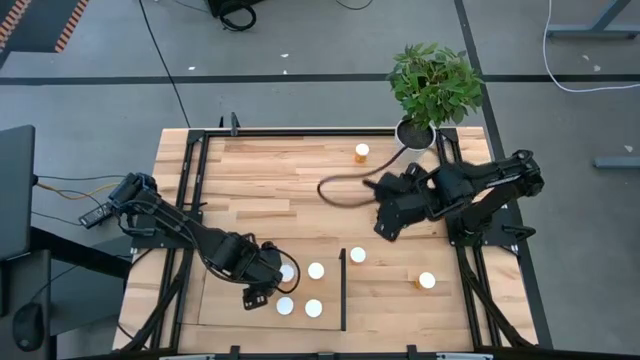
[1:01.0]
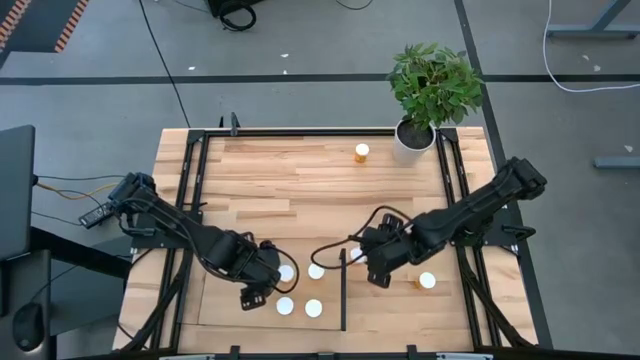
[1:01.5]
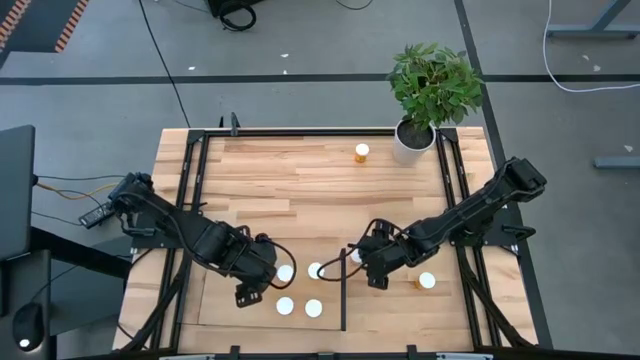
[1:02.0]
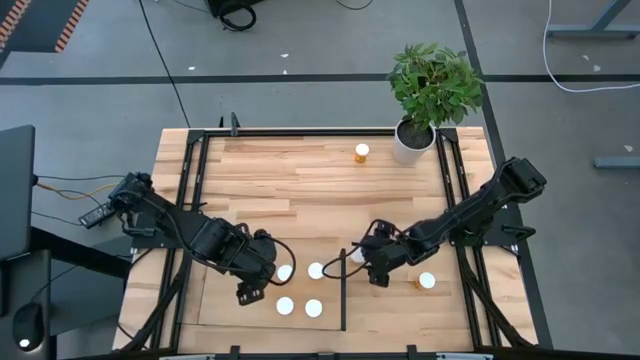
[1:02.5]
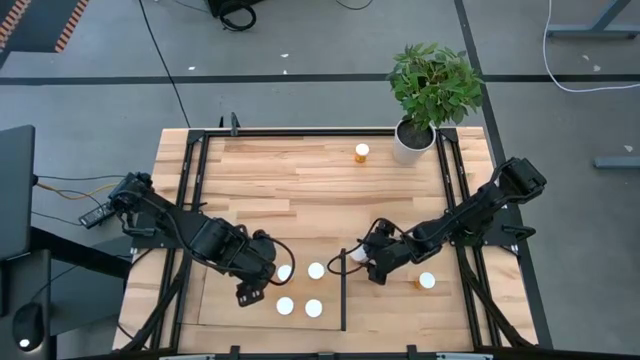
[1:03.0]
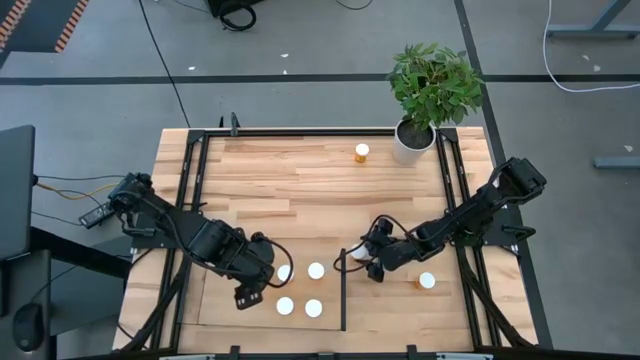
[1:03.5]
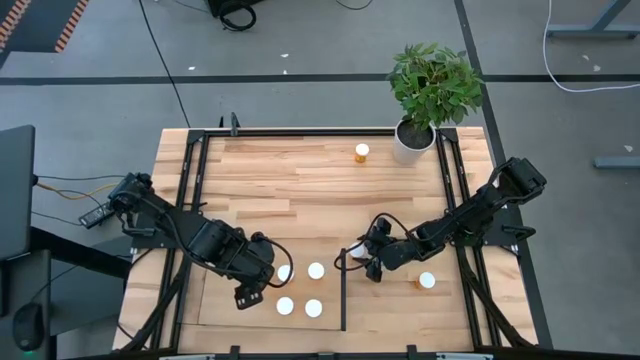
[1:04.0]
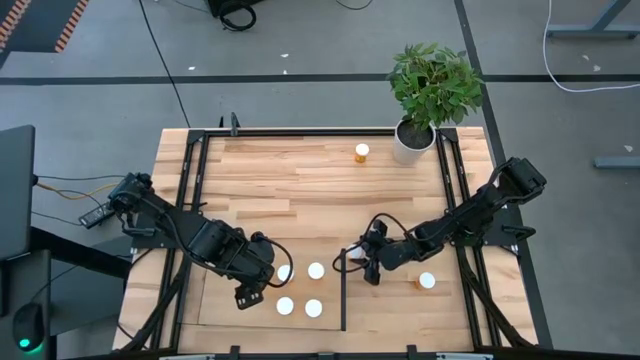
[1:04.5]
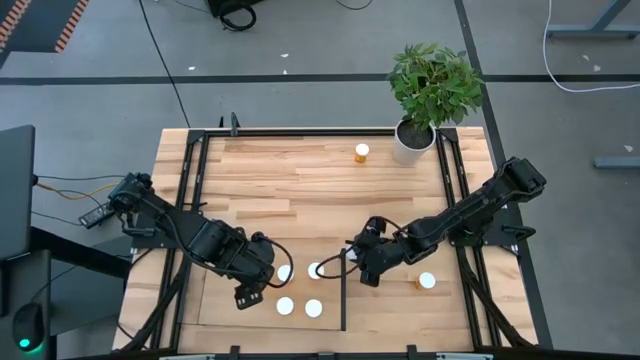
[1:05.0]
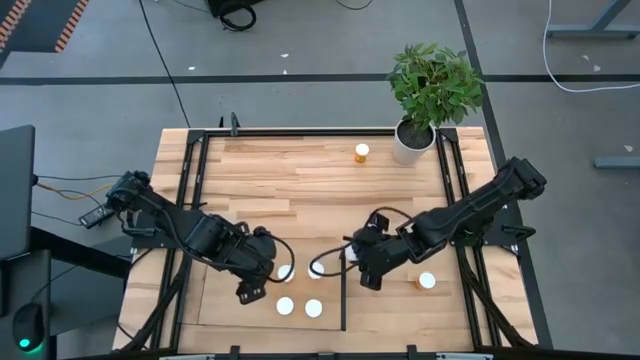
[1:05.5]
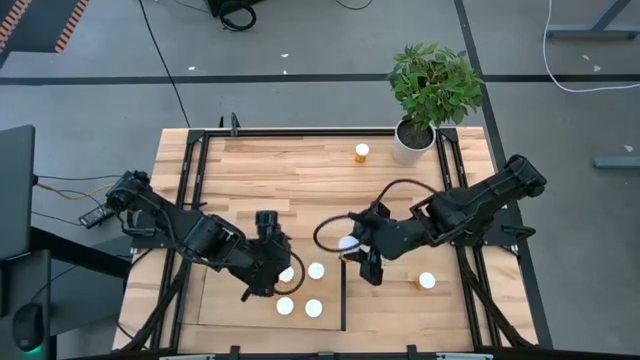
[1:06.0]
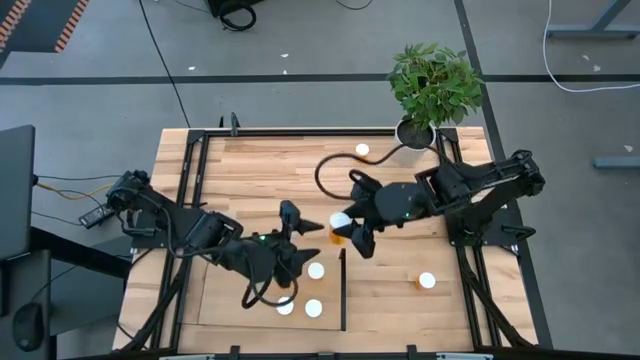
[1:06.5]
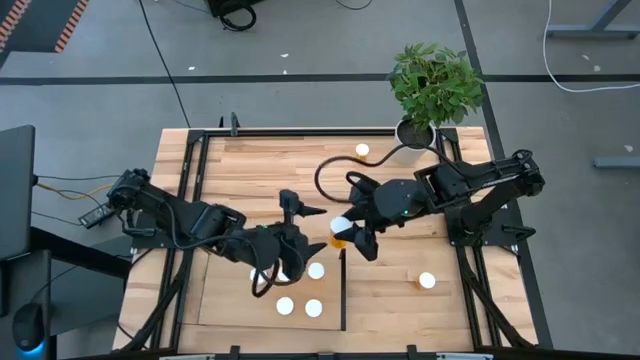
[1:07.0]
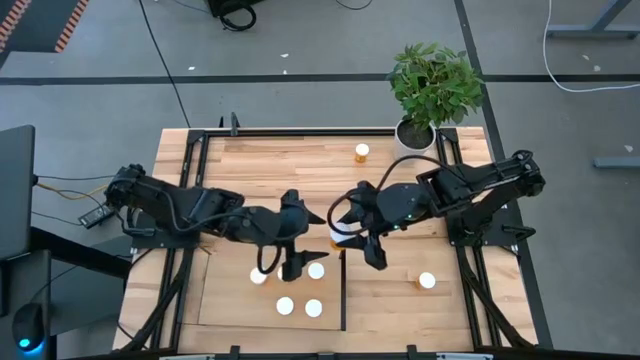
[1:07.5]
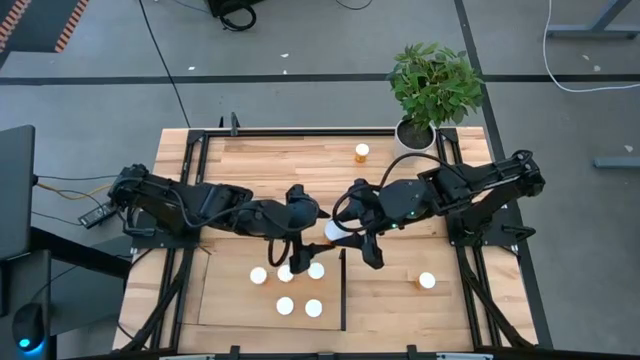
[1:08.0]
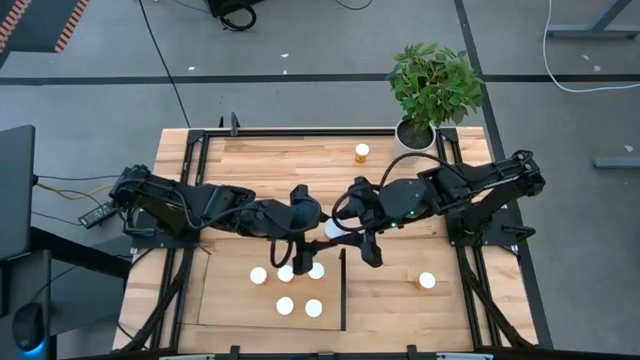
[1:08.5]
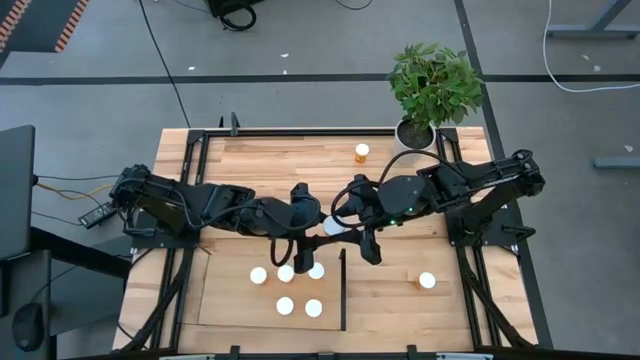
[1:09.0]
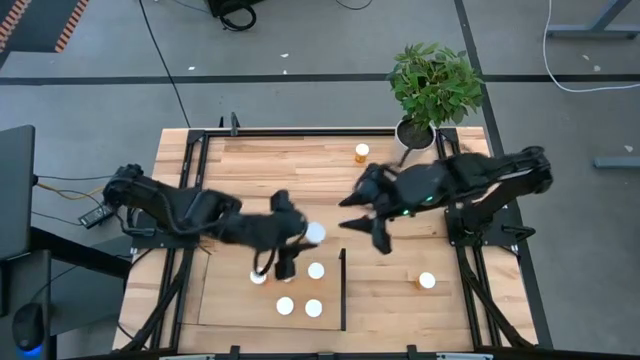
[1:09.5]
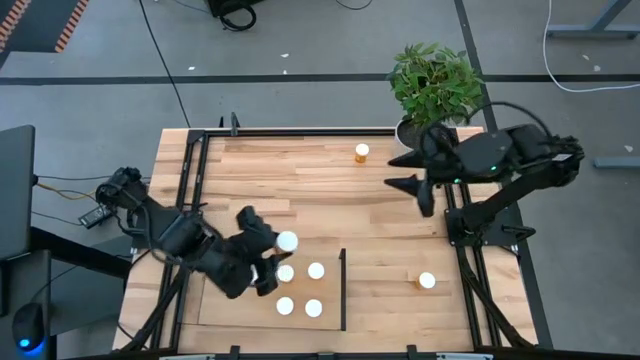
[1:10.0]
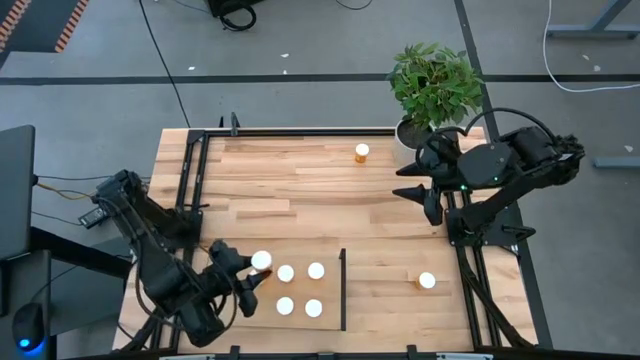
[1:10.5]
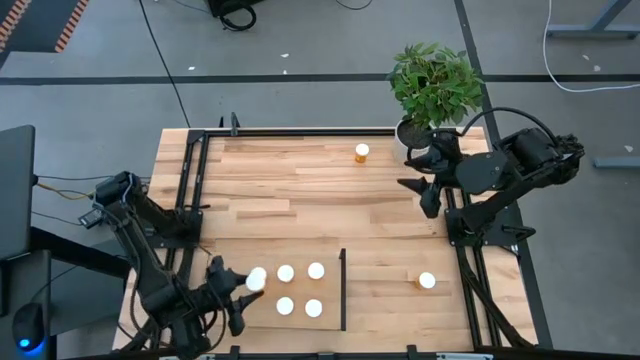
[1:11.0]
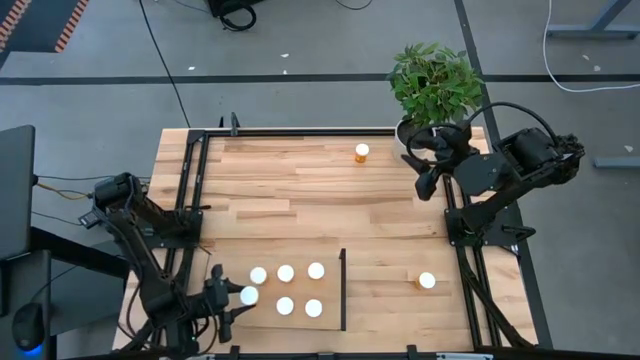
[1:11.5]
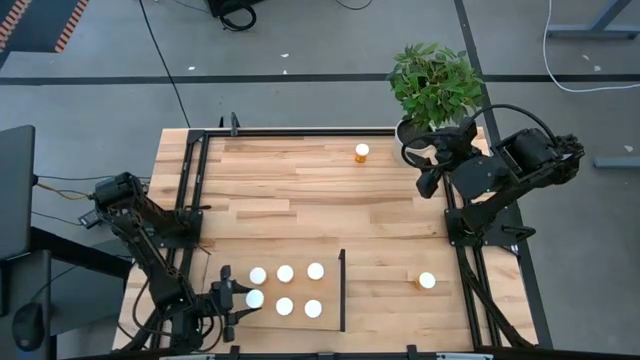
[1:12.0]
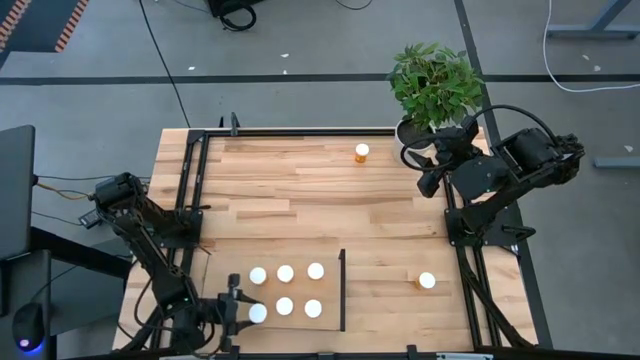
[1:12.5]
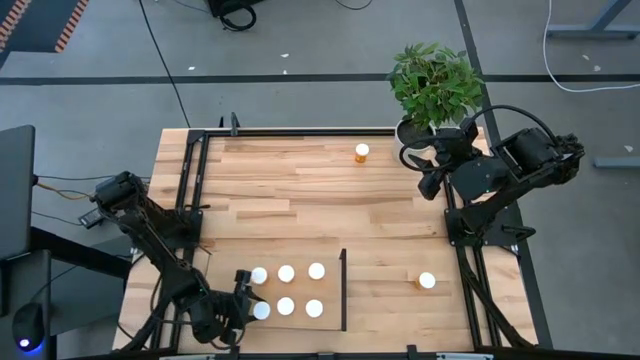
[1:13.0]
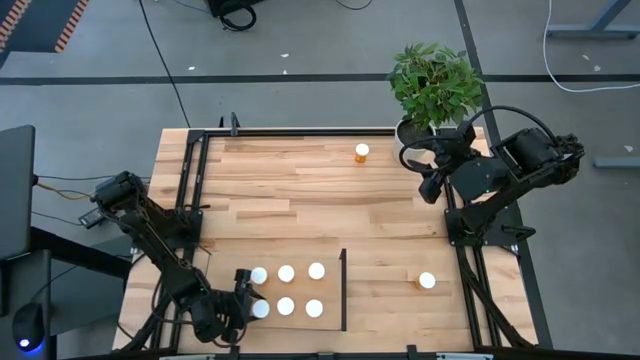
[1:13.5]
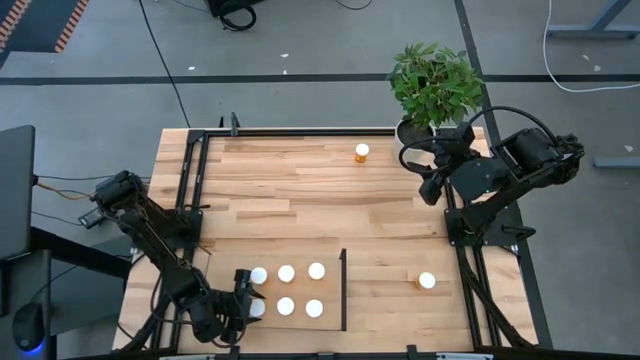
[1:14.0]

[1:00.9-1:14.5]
Task: Pick and place medicine bottles onto shelf by color
Align the orange pill bottle with the other orange pill bottle on the shelf

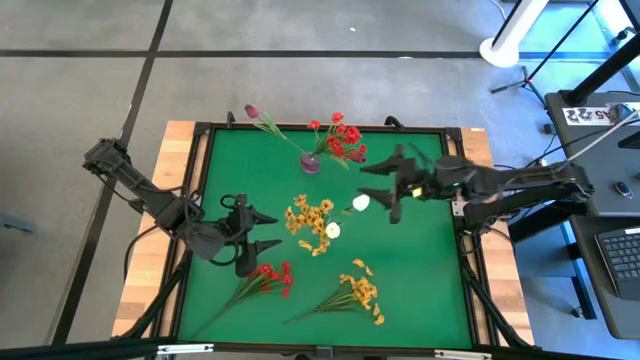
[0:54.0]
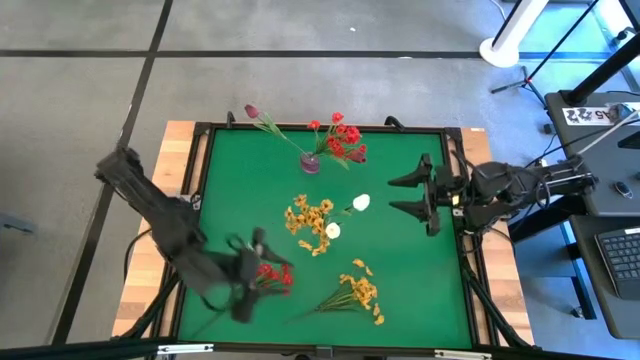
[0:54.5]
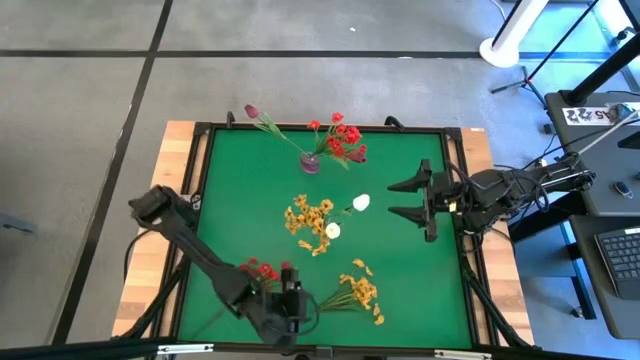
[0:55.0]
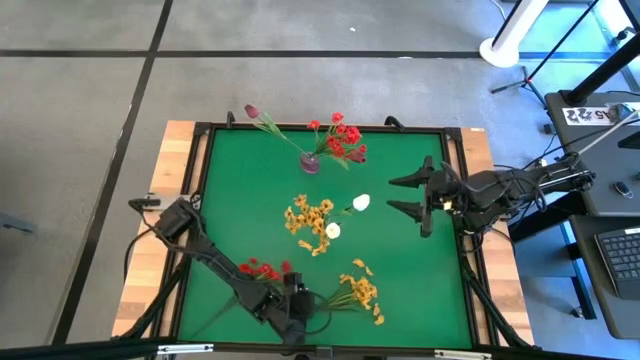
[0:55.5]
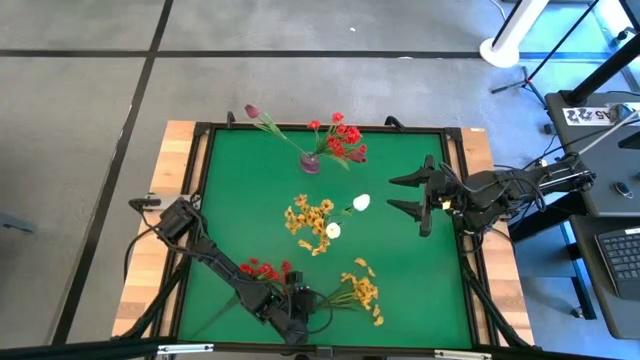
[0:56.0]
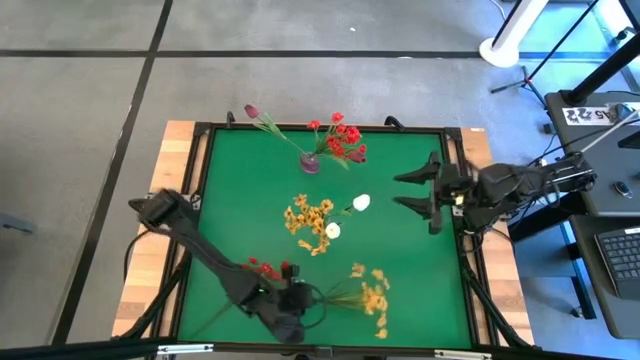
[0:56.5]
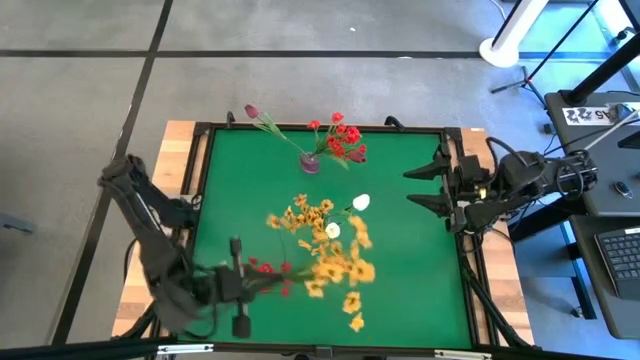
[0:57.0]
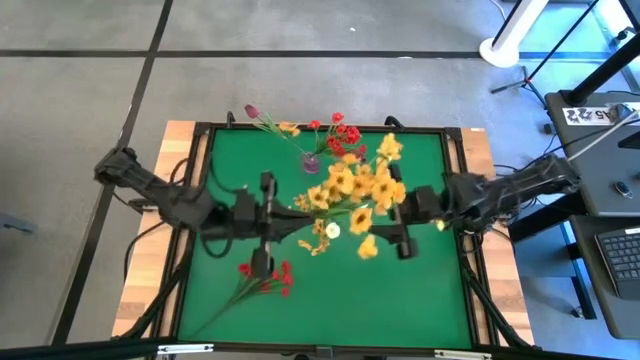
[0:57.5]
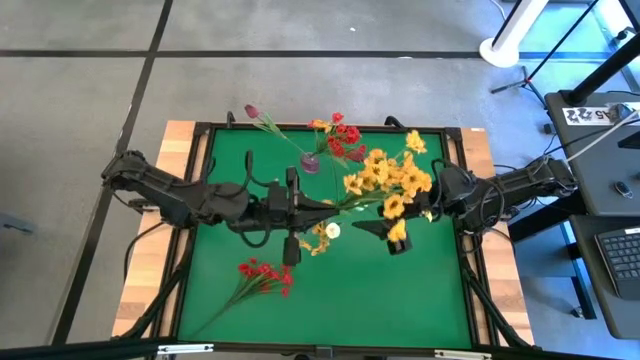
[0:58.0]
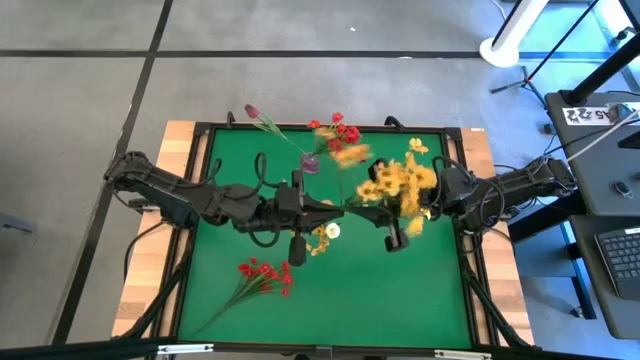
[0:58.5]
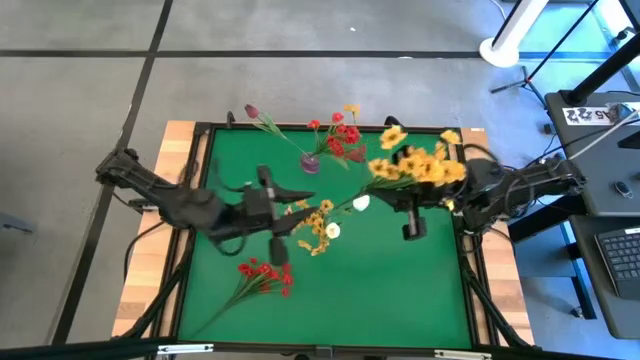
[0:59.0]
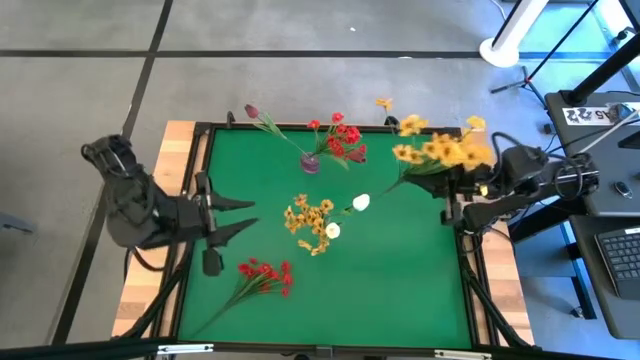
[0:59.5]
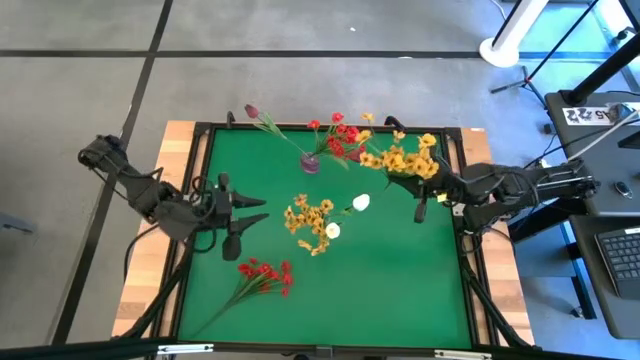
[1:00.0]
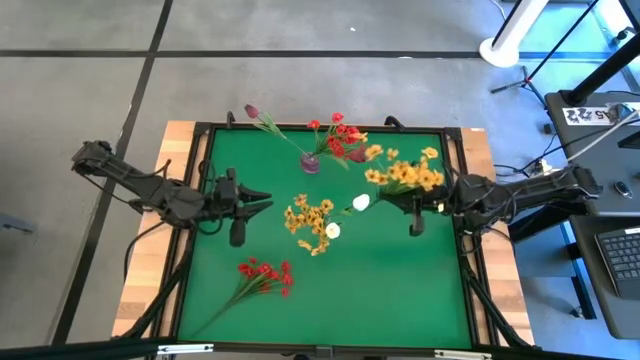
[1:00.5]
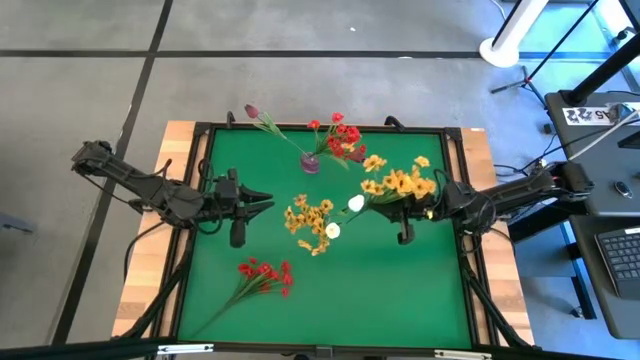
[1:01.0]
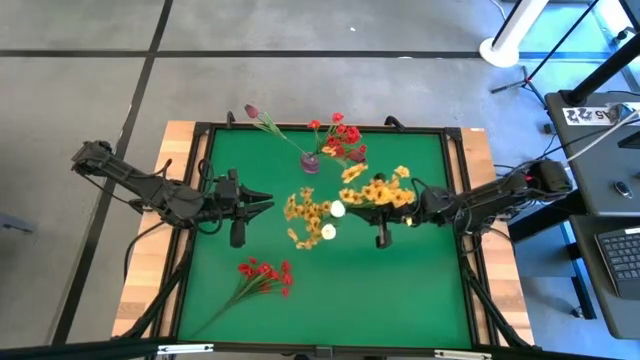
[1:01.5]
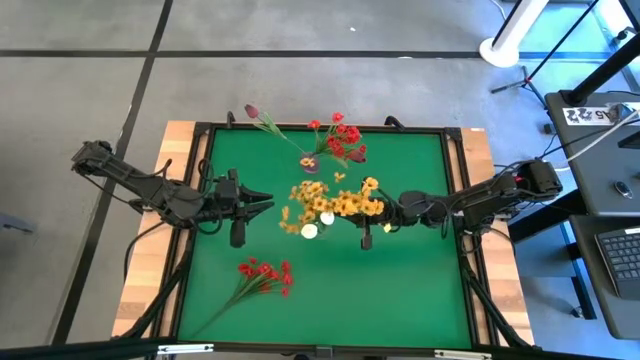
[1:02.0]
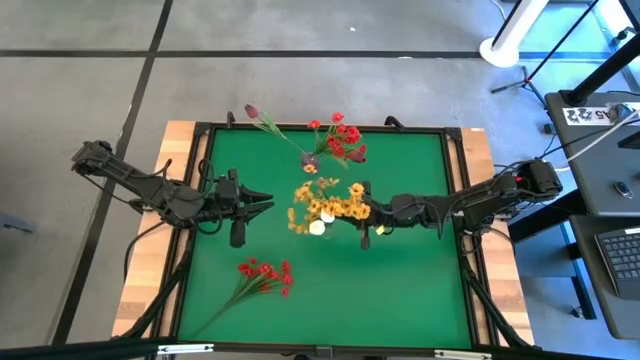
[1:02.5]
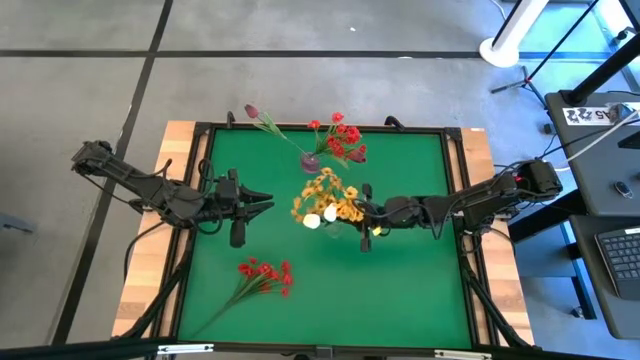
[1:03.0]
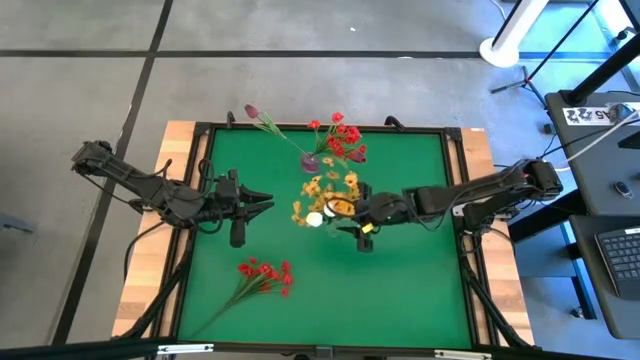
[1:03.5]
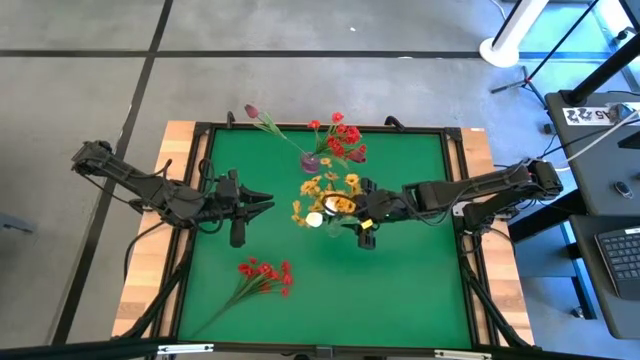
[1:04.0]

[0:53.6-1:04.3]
Task: Sort flowers into vase by color
Put the yellow flowers into the transparent vase
